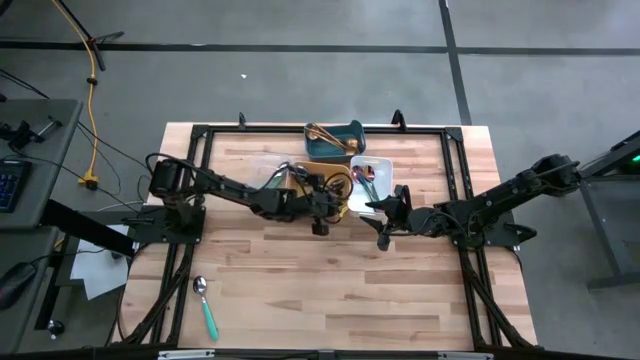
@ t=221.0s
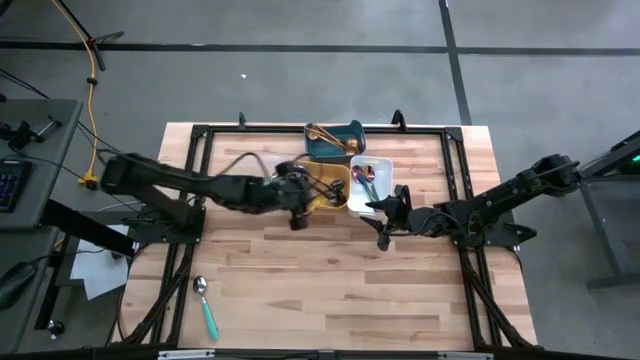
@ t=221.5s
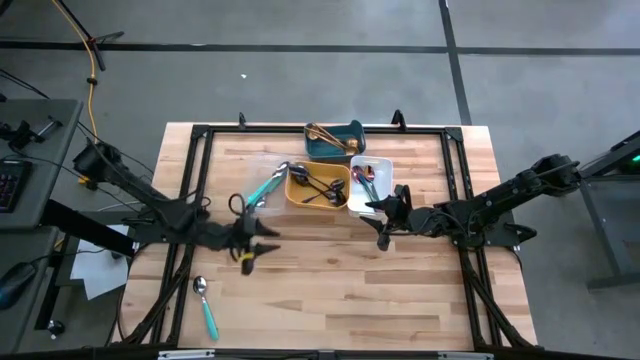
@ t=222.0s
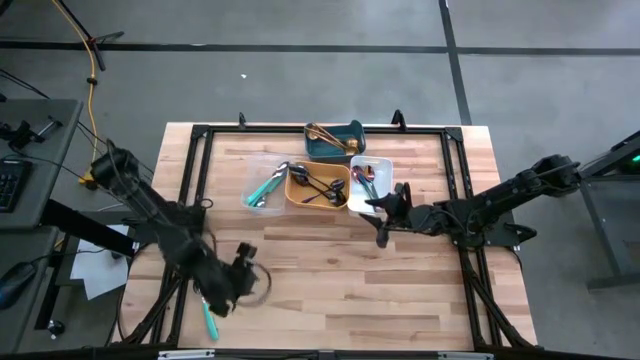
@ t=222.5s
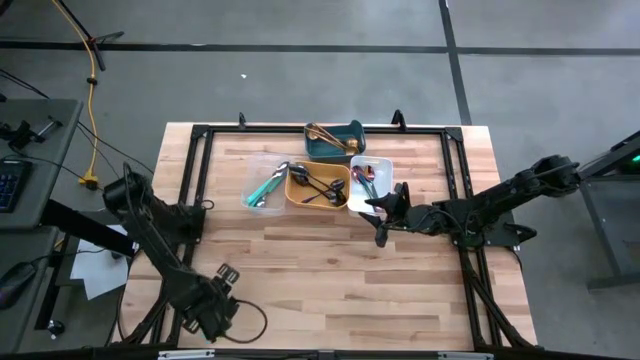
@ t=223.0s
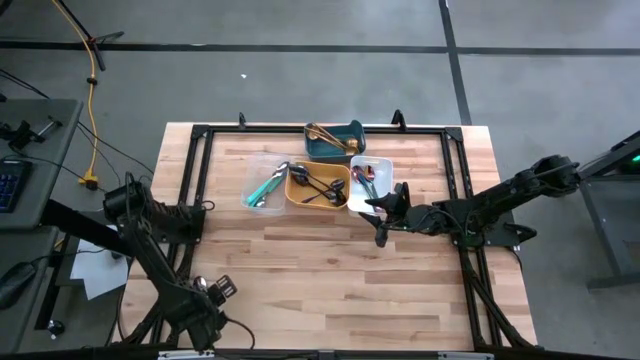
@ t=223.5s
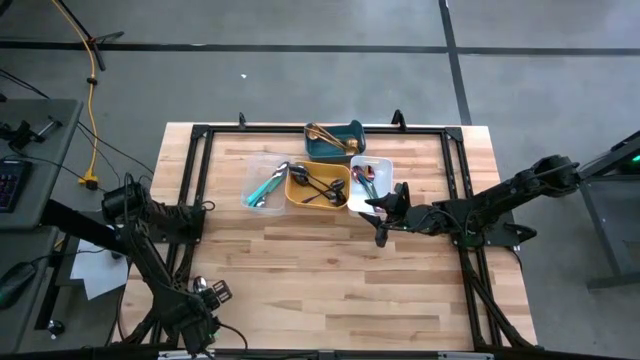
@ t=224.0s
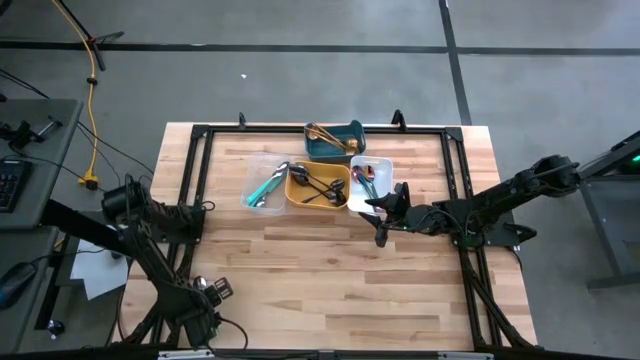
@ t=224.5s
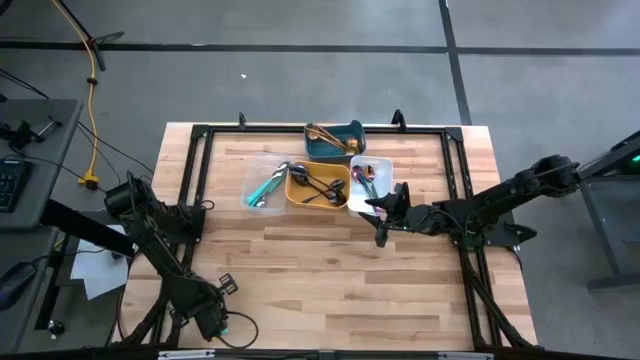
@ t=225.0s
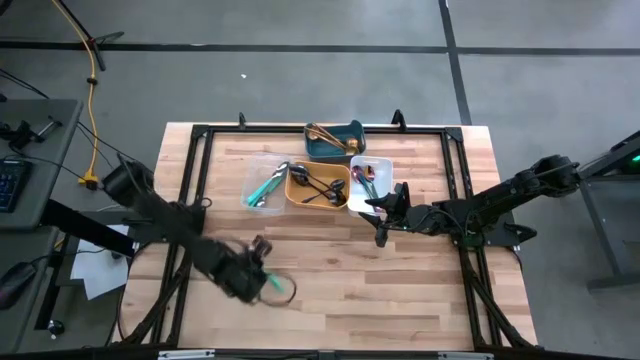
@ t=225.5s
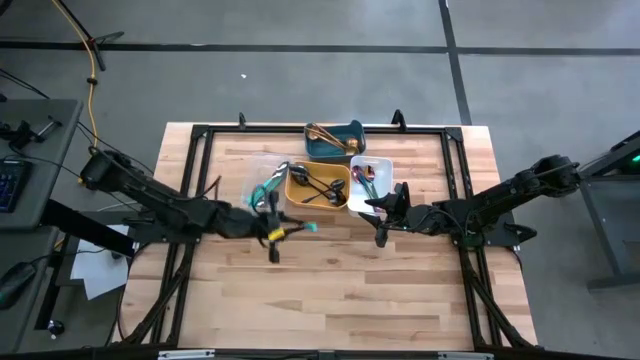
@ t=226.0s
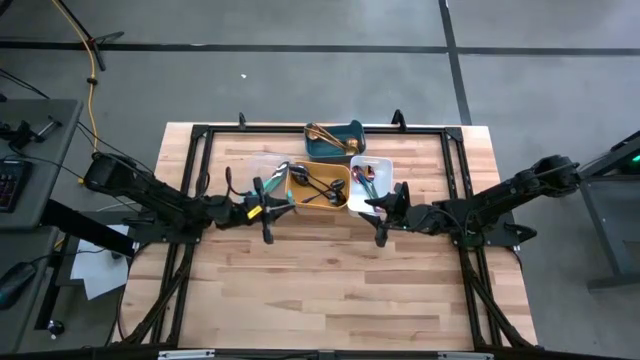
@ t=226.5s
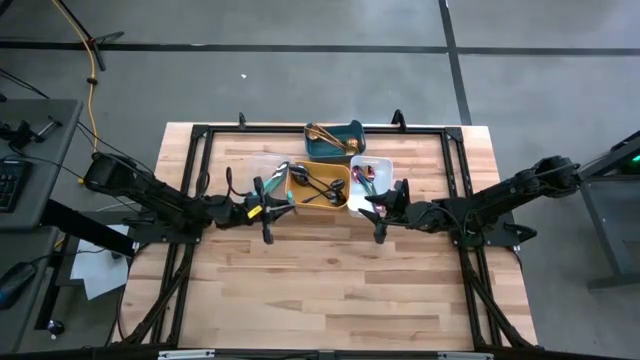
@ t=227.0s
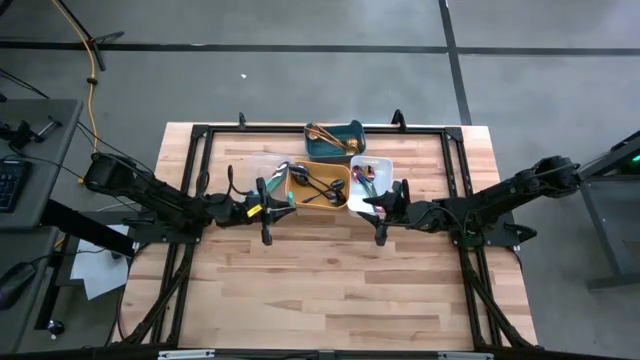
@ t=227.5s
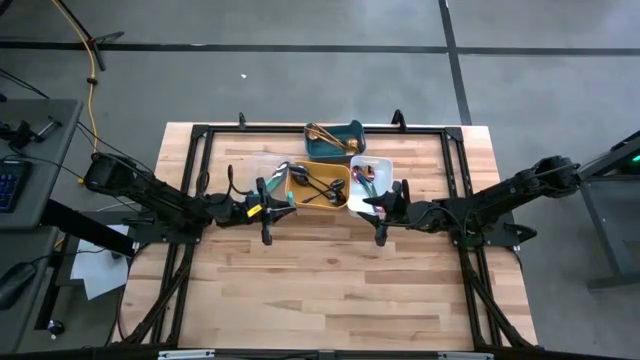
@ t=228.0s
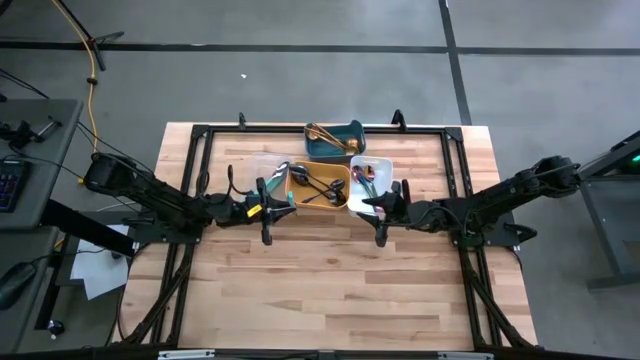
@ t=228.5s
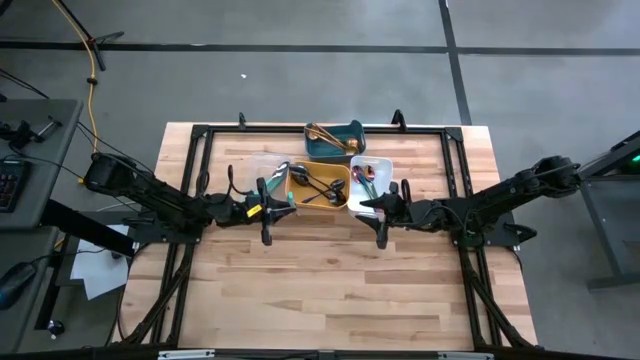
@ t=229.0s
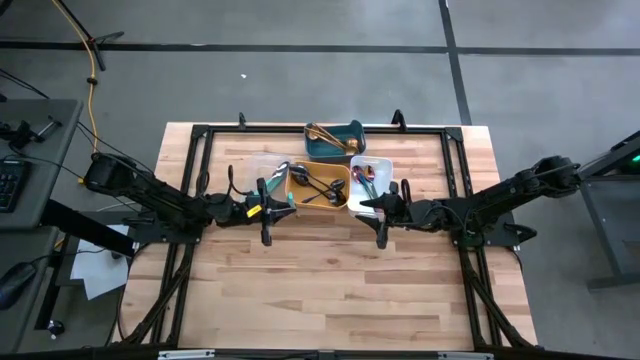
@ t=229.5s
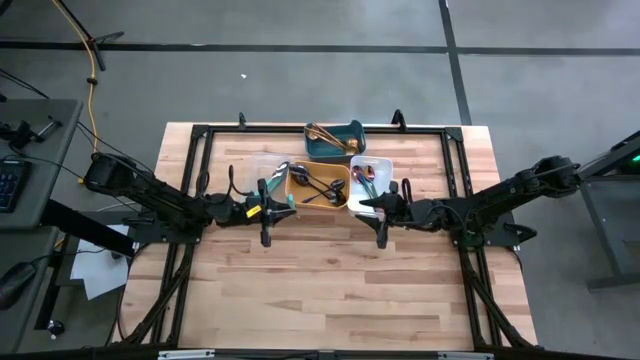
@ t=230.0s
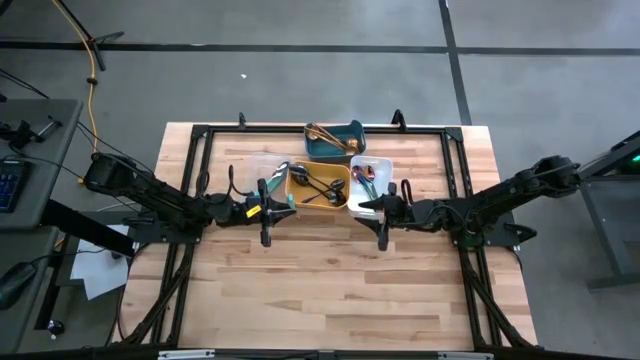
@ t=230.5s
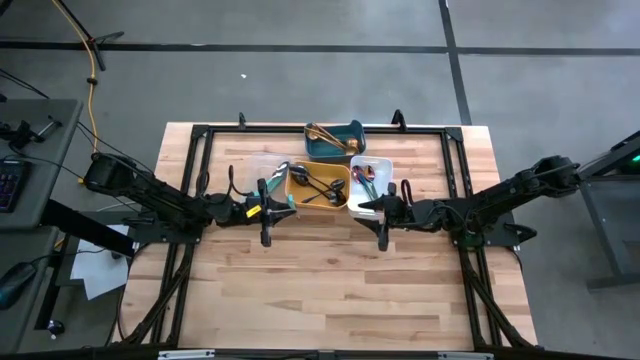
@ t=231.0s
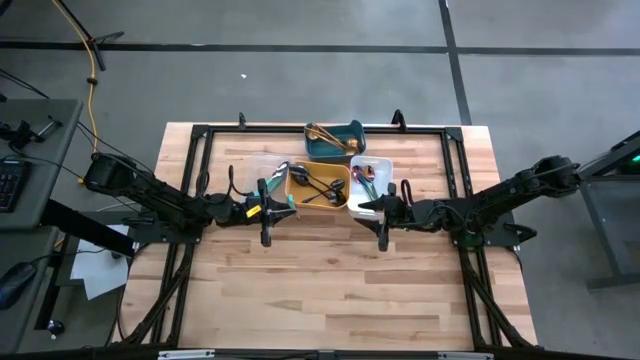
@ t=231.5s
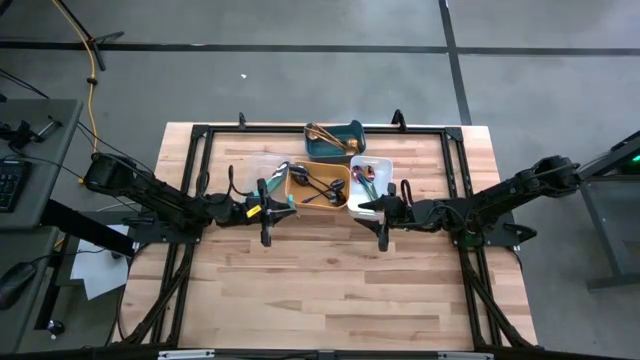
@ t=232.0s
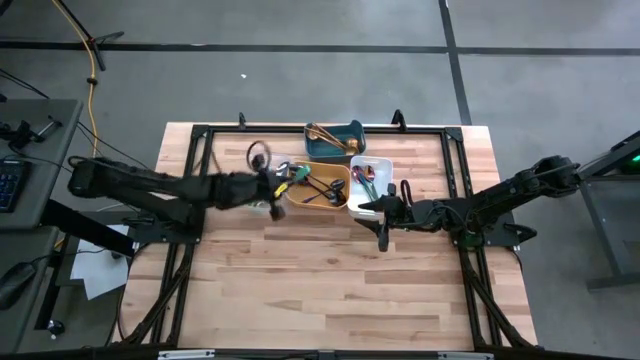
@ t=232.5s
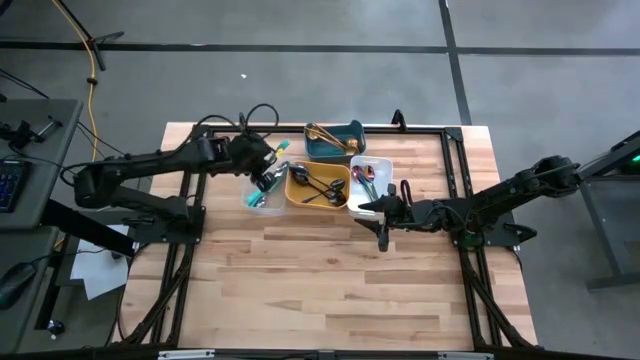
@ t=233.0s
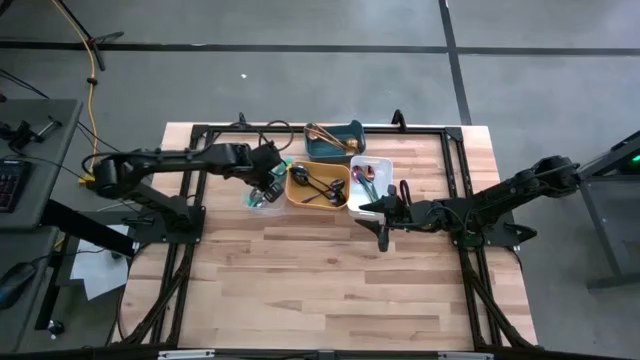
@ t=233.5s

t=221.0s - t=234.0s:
Task: Sort silverware by color (type)
Put the turquoise blue spoon into the transparent bin

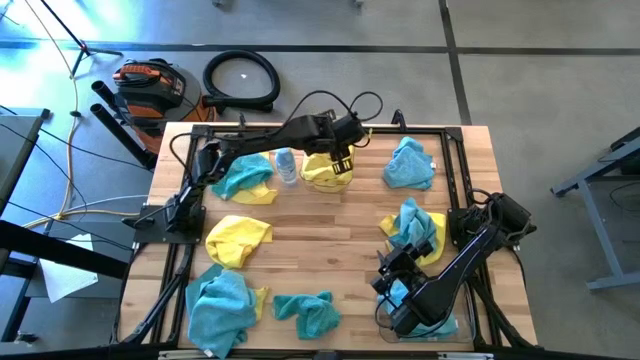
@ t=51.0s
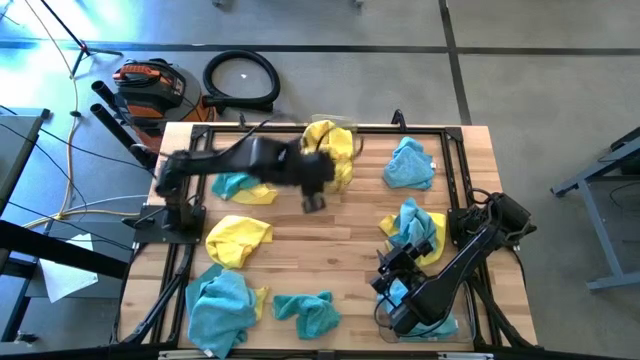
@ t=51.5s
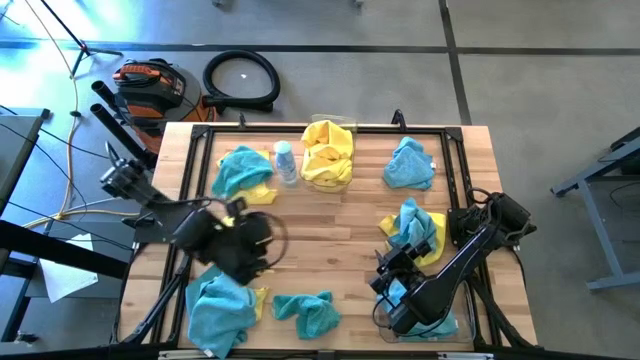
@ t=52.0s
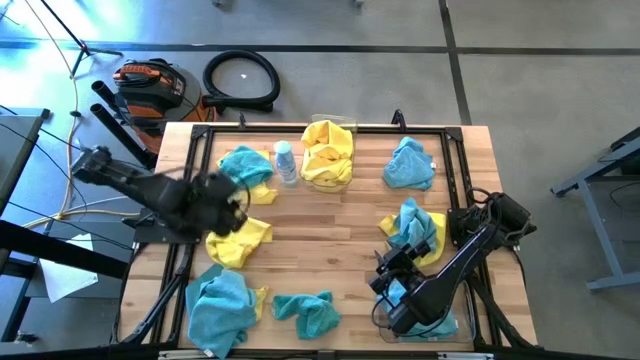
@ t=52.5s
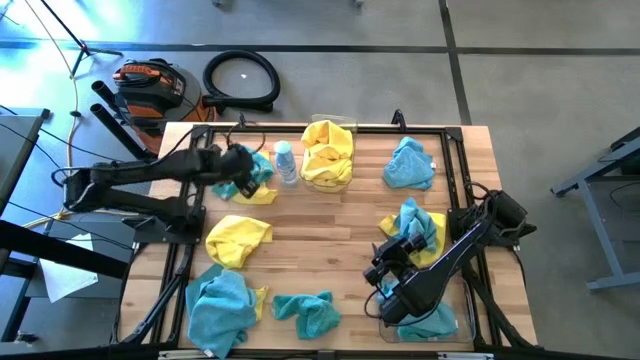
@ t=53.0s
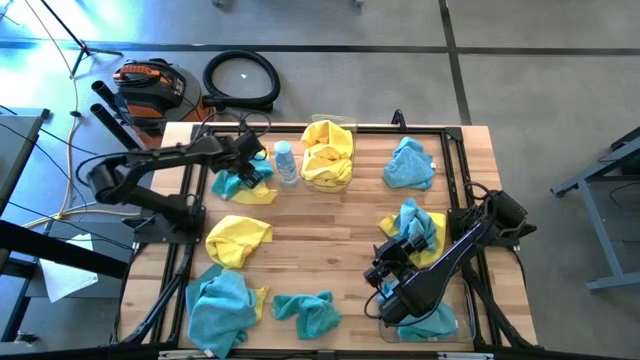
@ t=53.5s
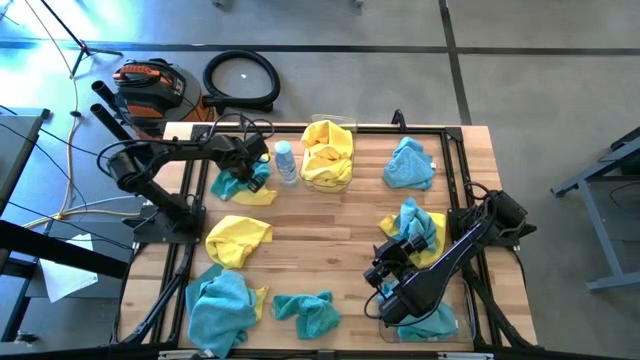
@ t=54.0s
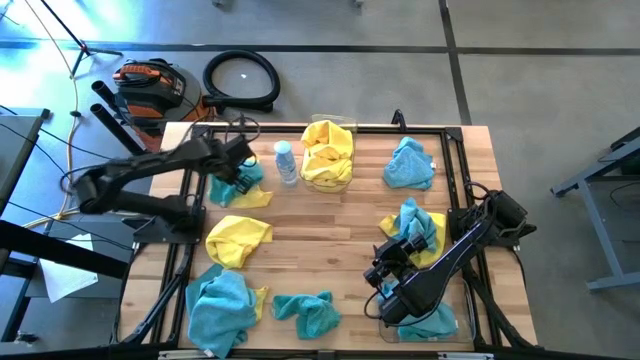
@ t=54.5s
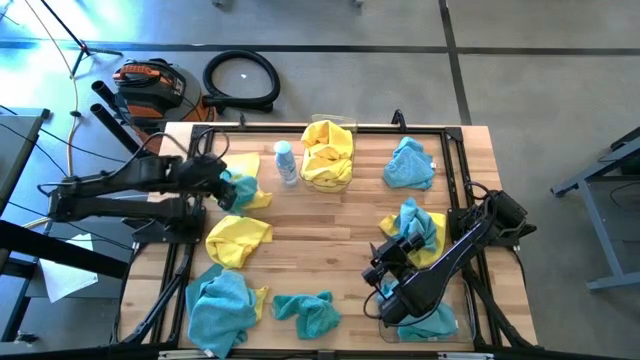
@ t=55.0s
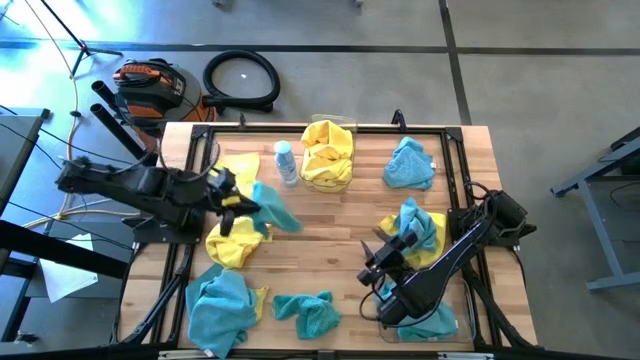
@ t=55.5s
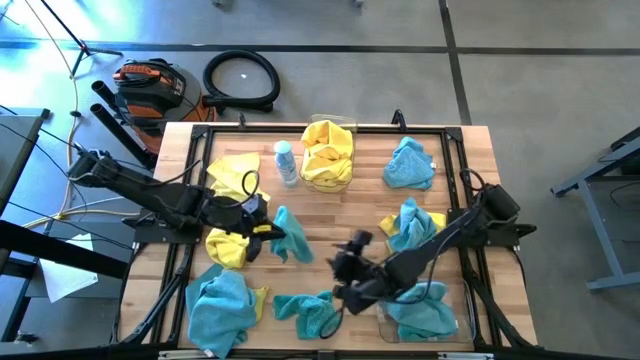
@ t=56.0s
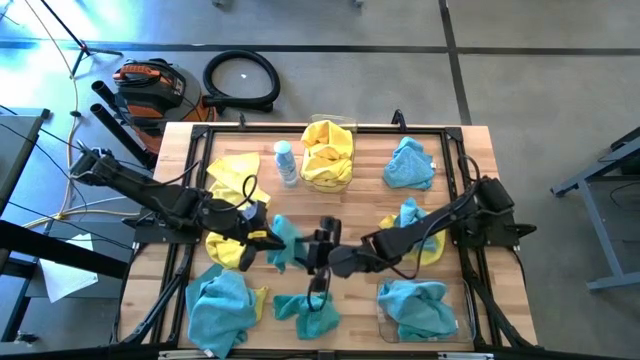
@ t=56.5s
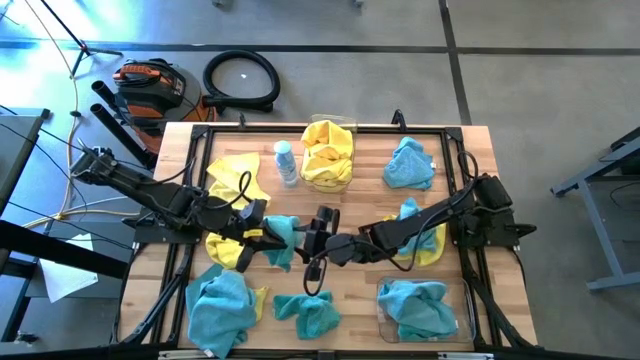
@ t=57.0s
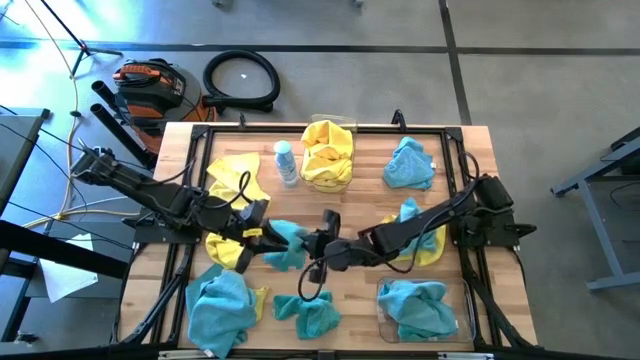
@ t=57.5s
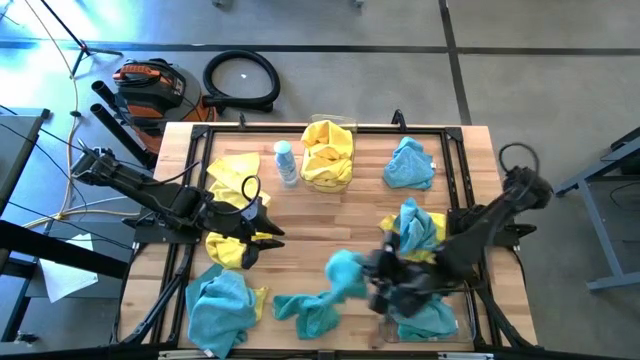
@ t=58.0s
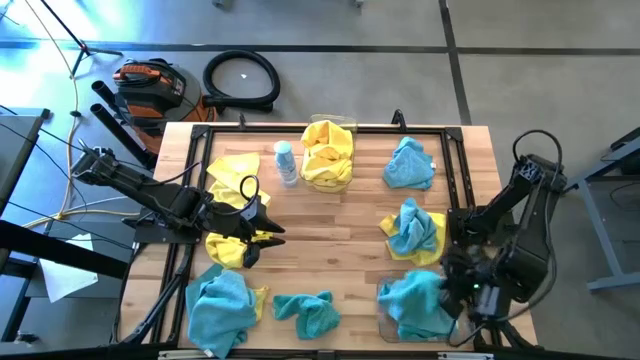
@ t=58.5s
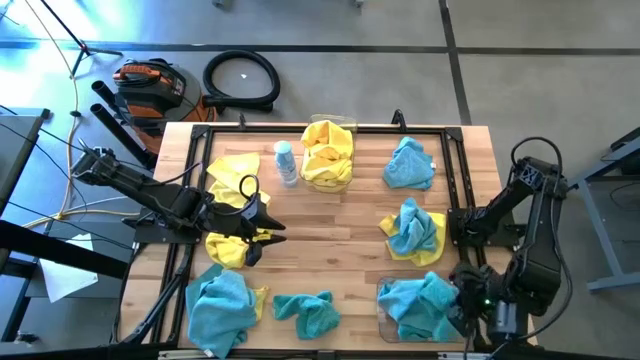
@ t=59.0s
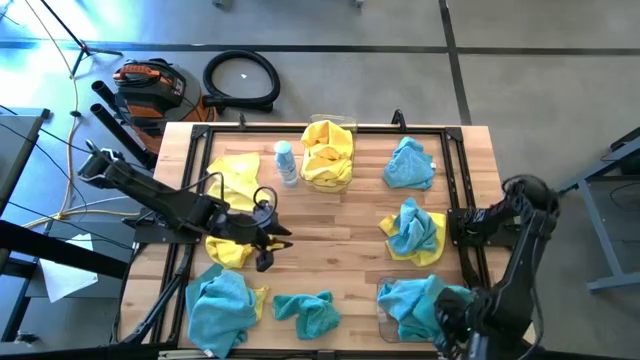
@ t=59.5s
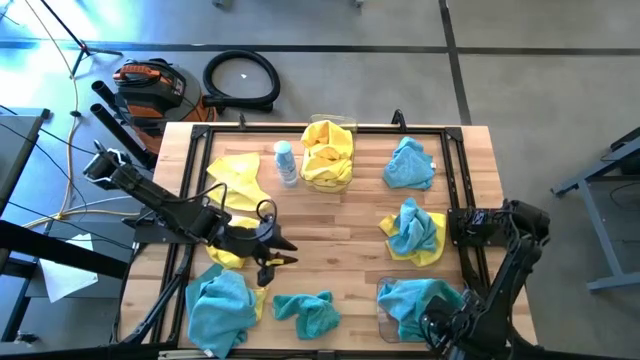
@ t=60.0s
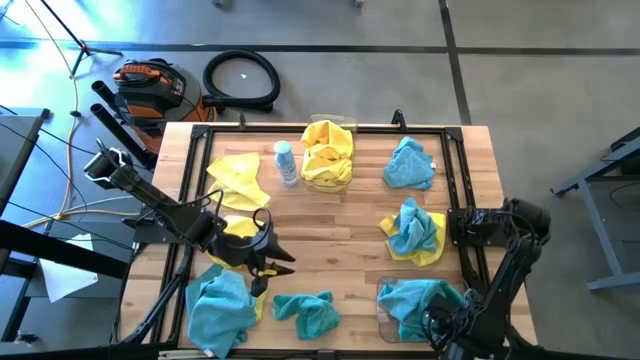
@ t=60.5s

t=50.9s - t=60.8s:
Task: Sort microfiber towel by color & place in baskets
Put the blue towel into the bottom transparent bin
